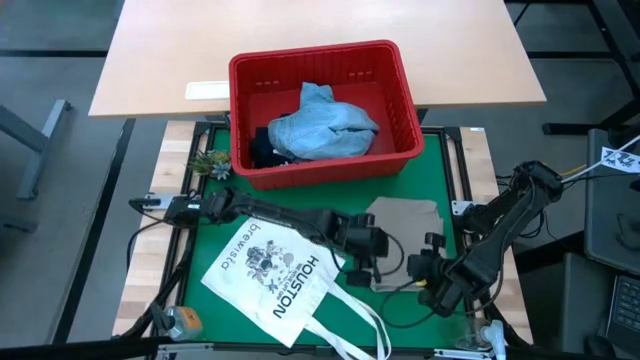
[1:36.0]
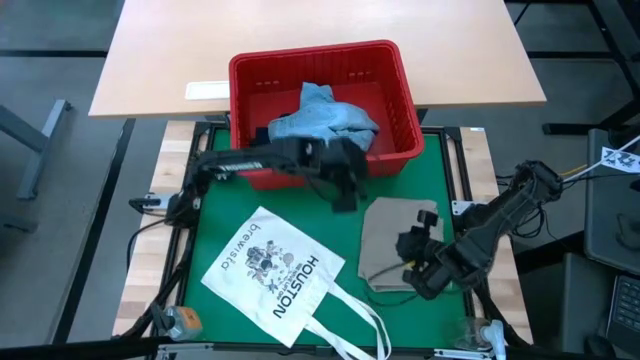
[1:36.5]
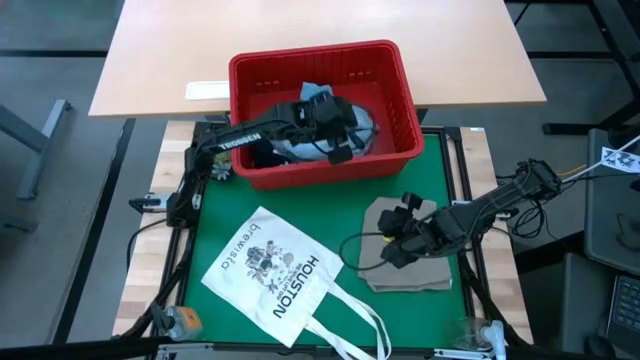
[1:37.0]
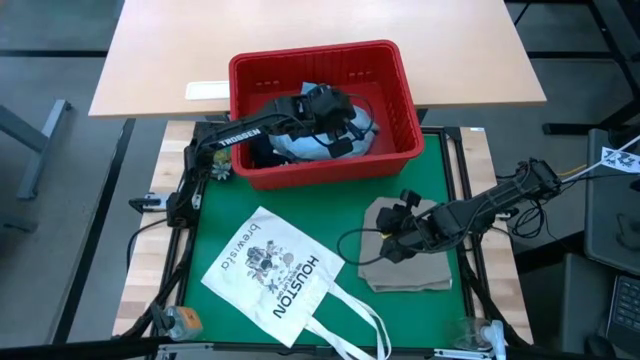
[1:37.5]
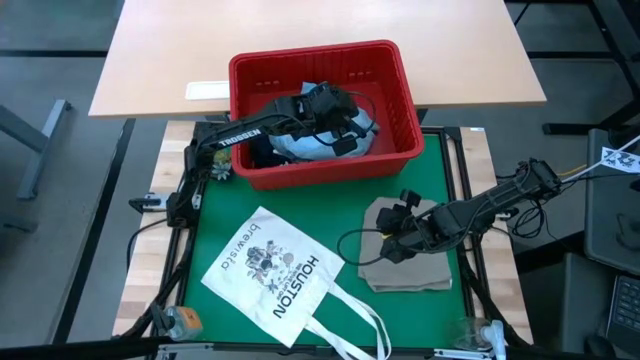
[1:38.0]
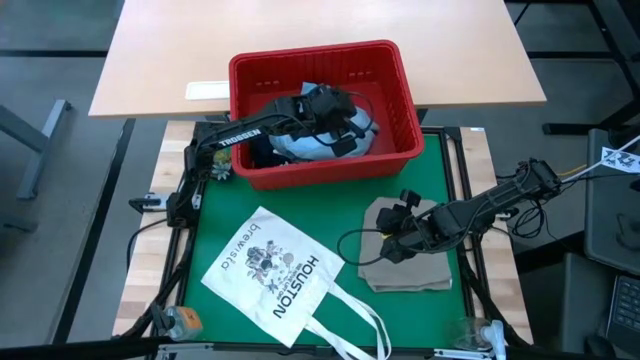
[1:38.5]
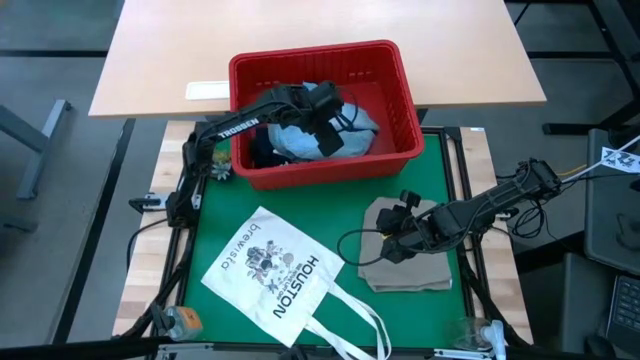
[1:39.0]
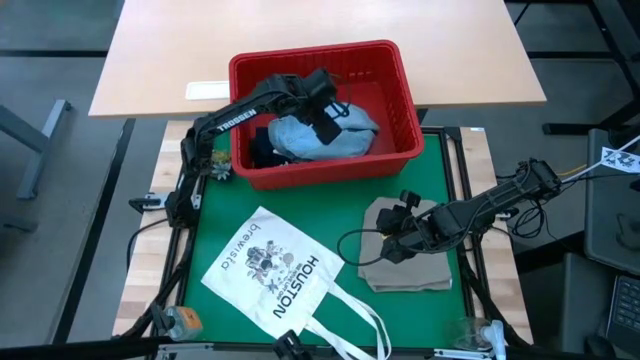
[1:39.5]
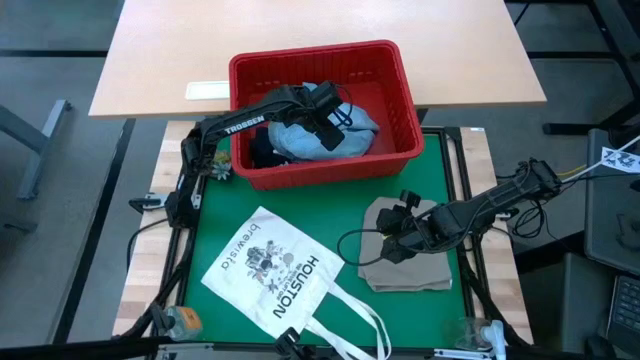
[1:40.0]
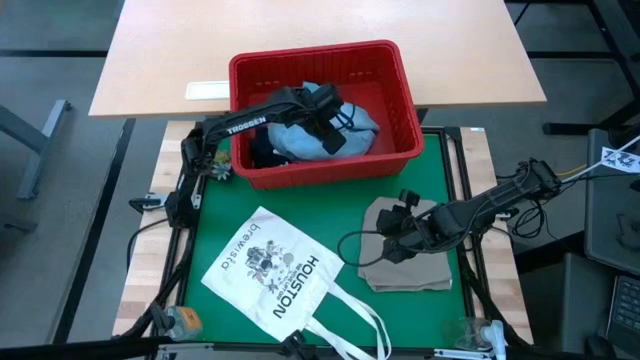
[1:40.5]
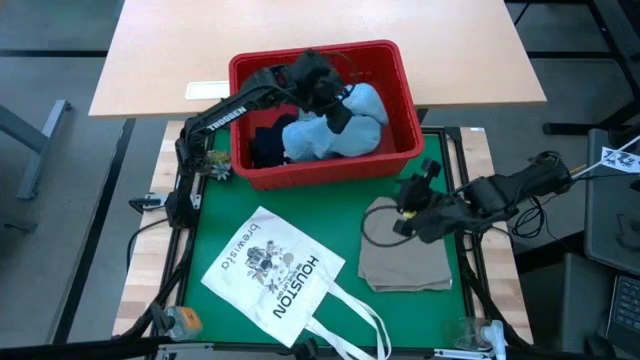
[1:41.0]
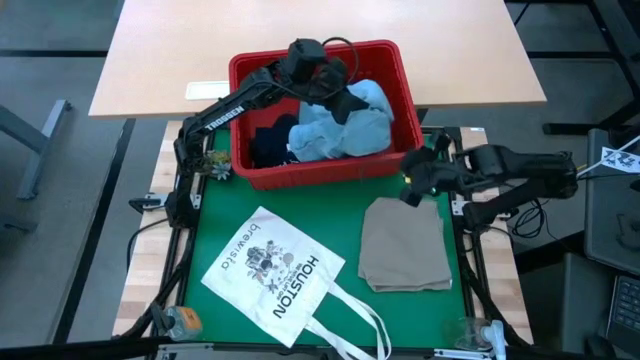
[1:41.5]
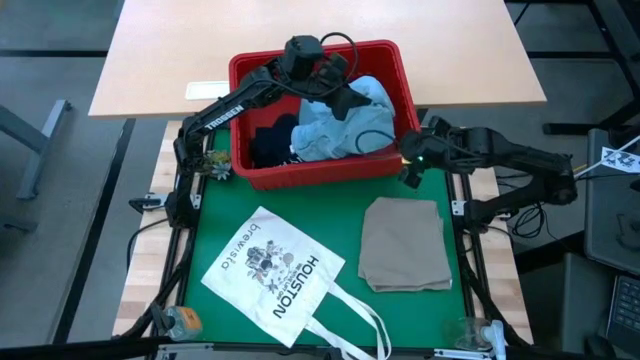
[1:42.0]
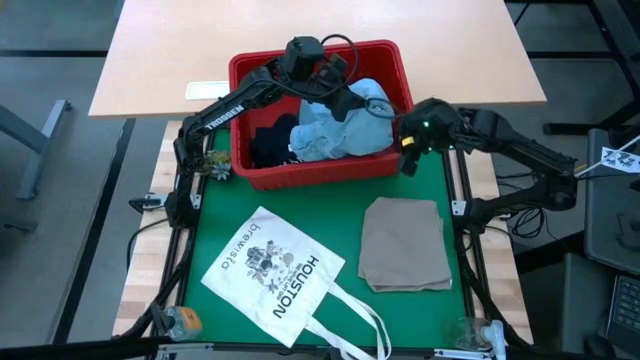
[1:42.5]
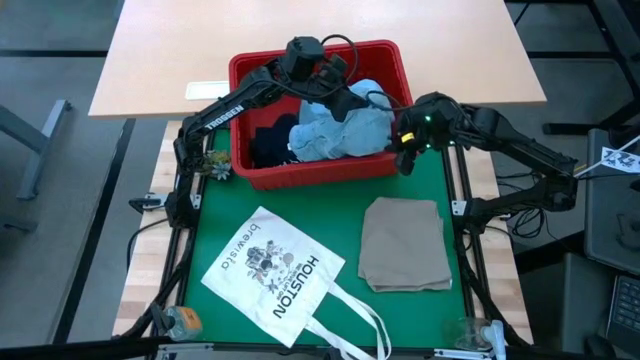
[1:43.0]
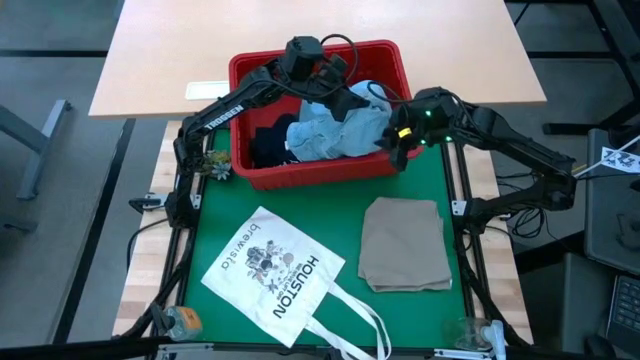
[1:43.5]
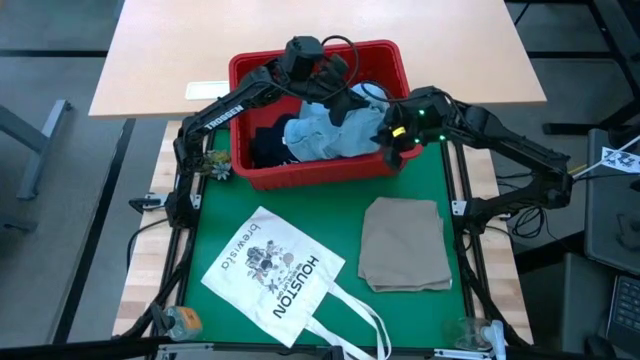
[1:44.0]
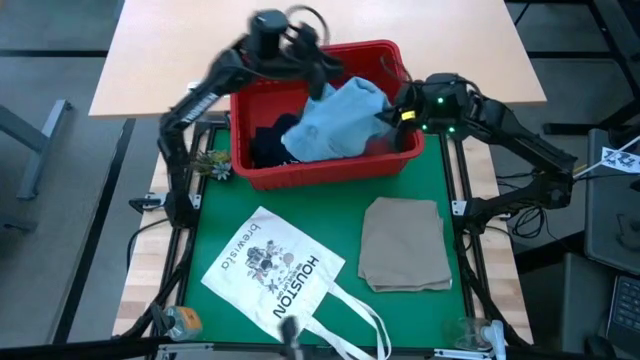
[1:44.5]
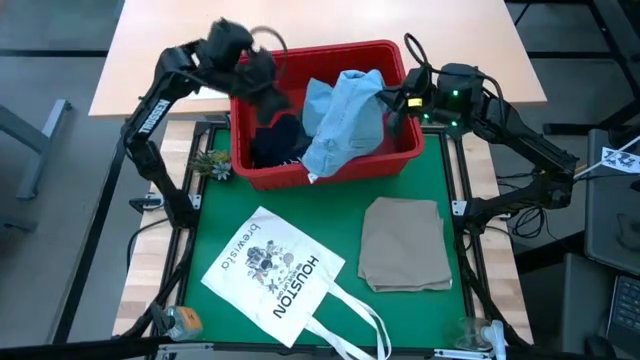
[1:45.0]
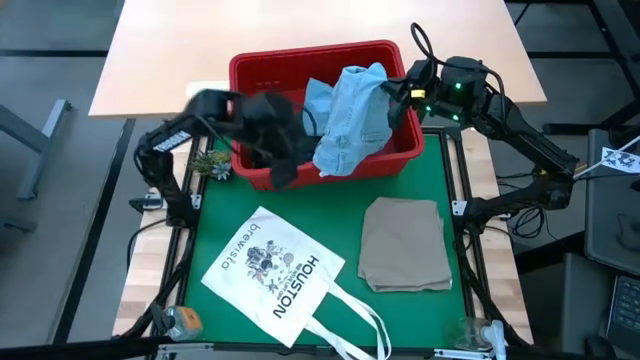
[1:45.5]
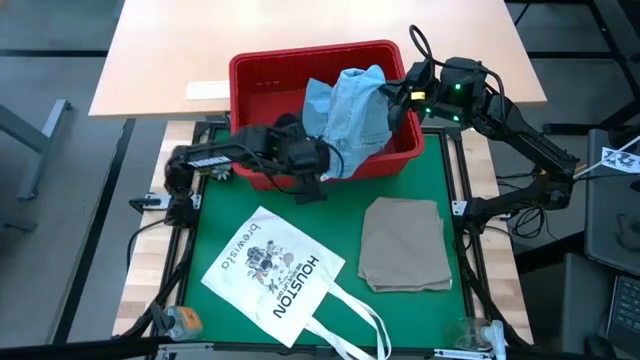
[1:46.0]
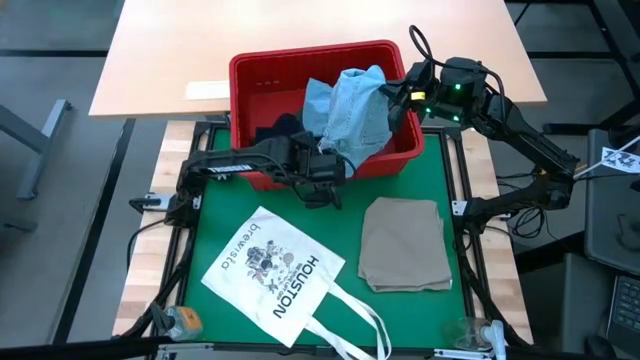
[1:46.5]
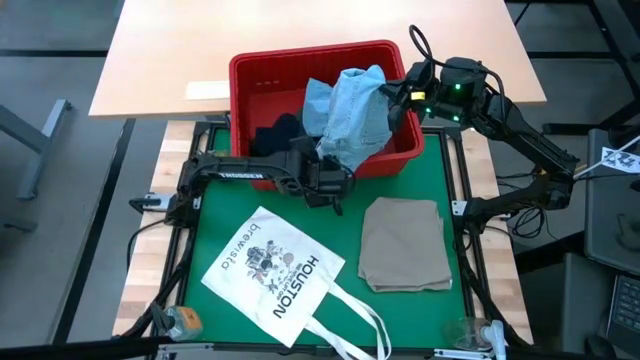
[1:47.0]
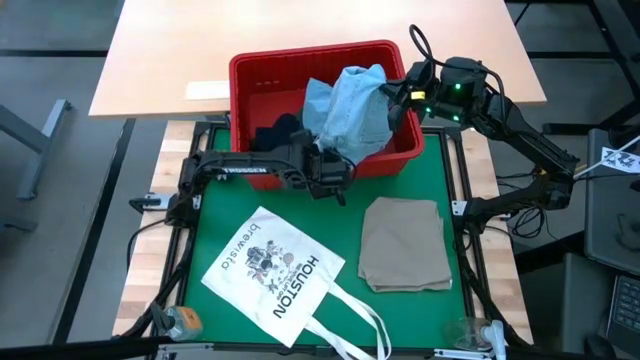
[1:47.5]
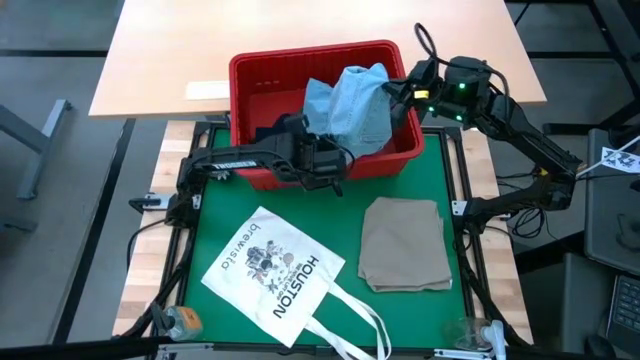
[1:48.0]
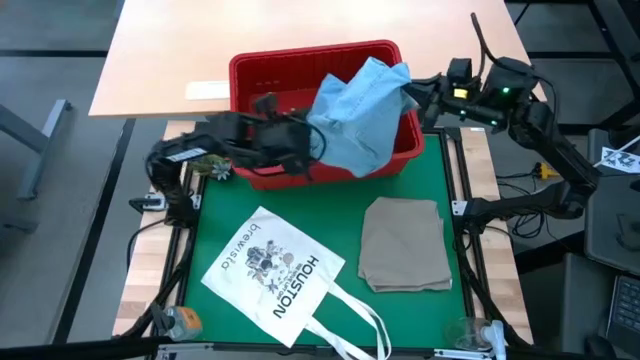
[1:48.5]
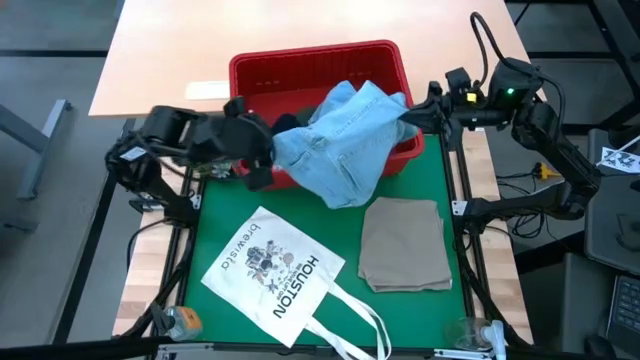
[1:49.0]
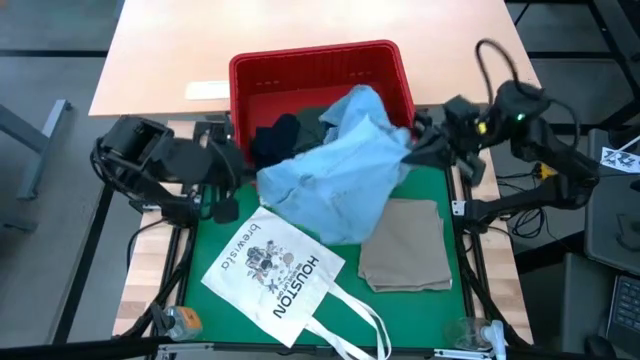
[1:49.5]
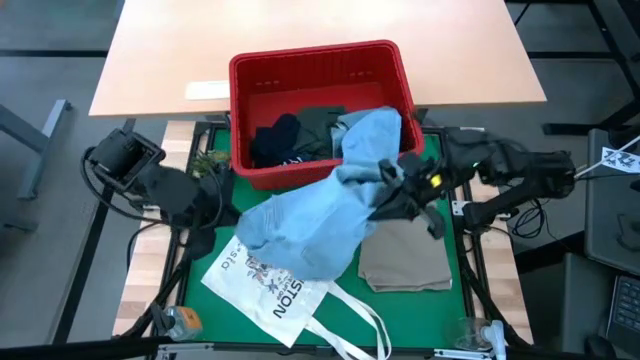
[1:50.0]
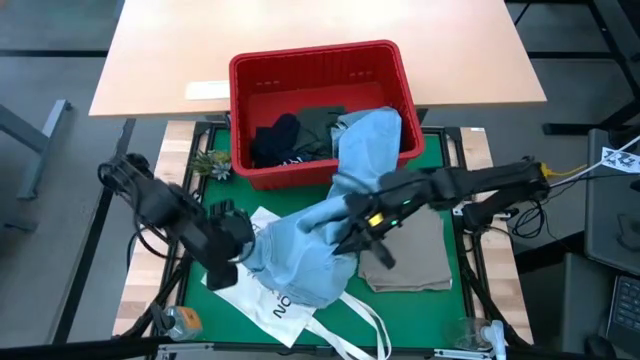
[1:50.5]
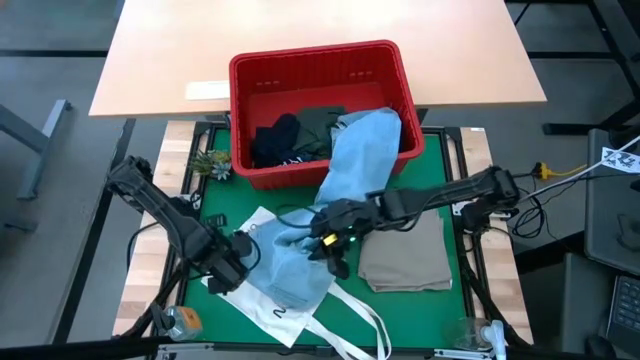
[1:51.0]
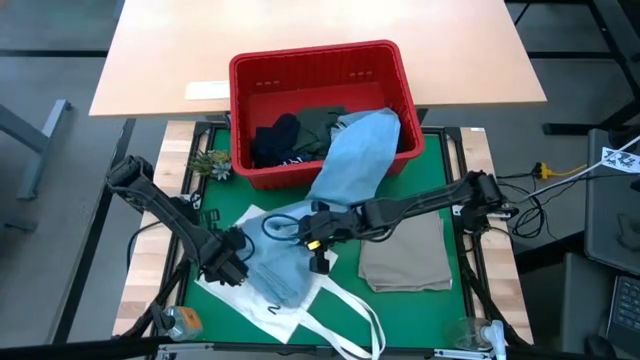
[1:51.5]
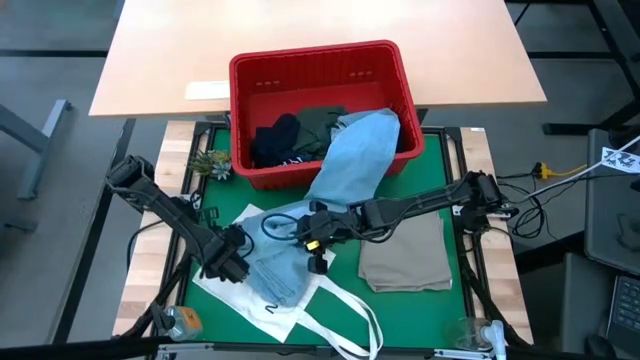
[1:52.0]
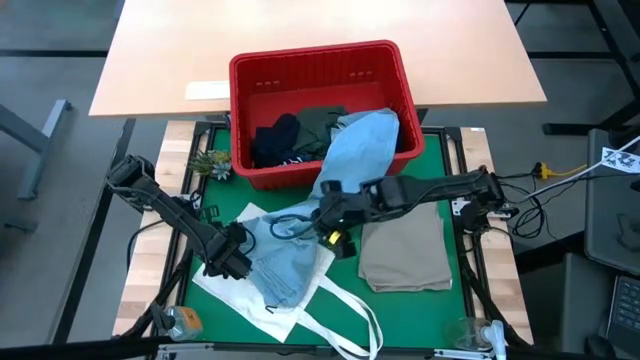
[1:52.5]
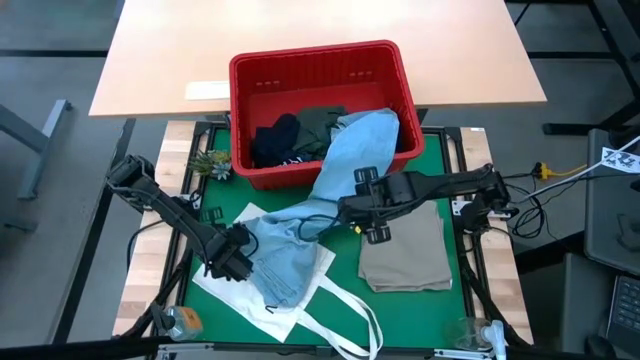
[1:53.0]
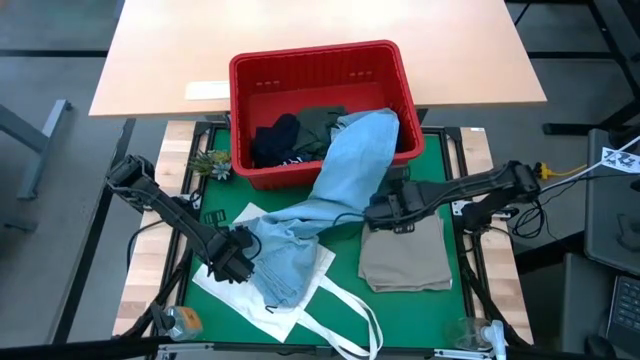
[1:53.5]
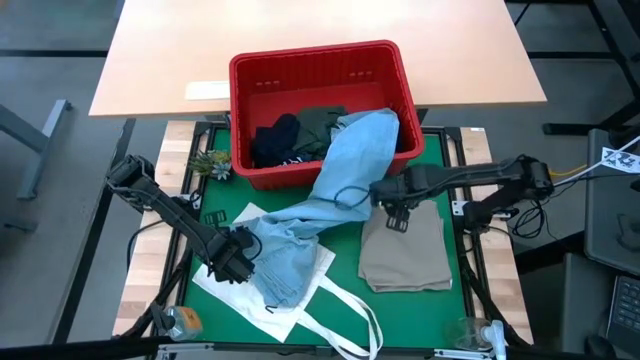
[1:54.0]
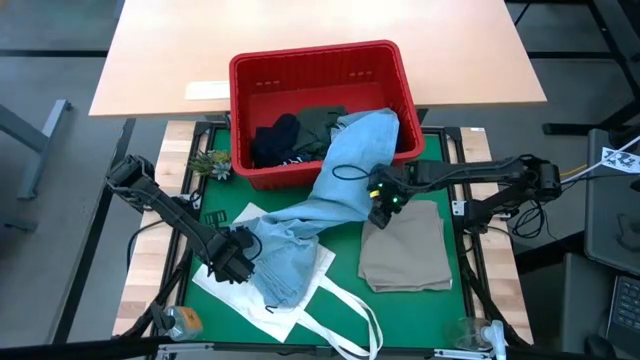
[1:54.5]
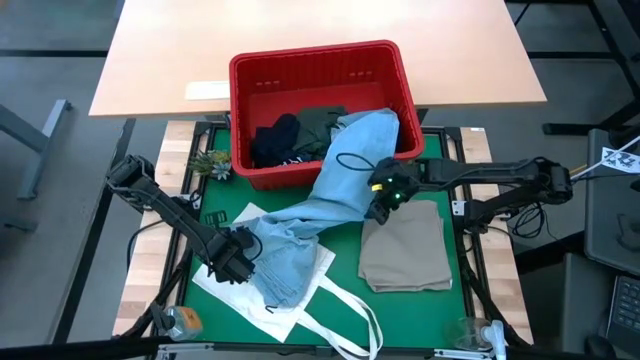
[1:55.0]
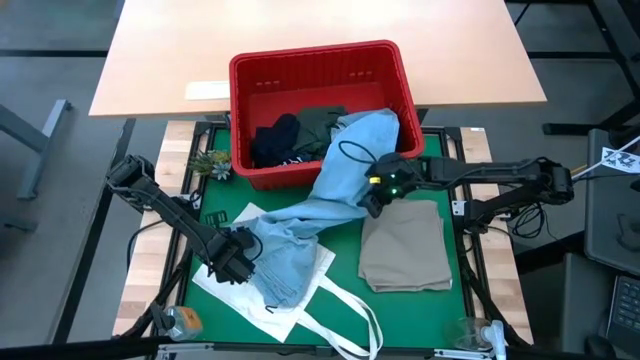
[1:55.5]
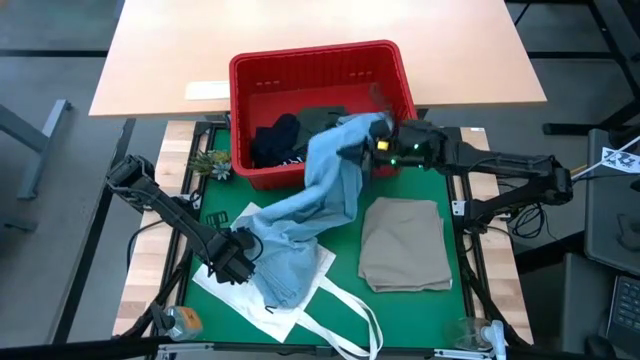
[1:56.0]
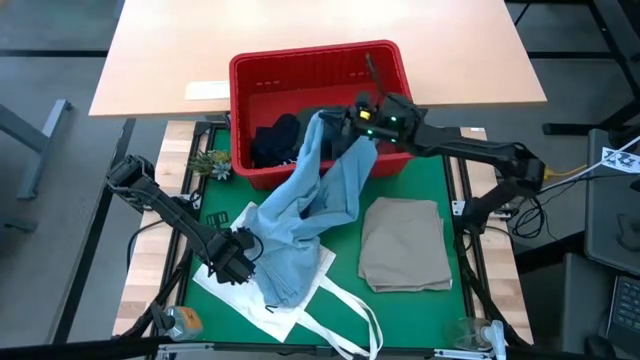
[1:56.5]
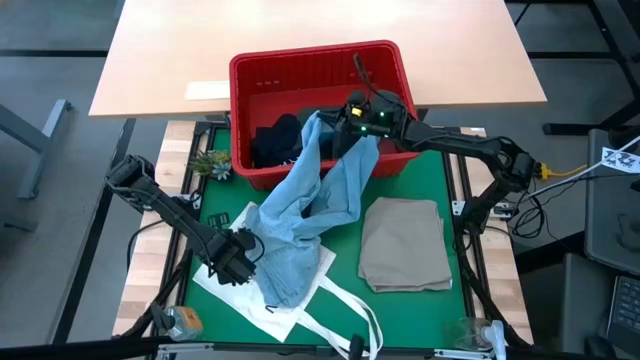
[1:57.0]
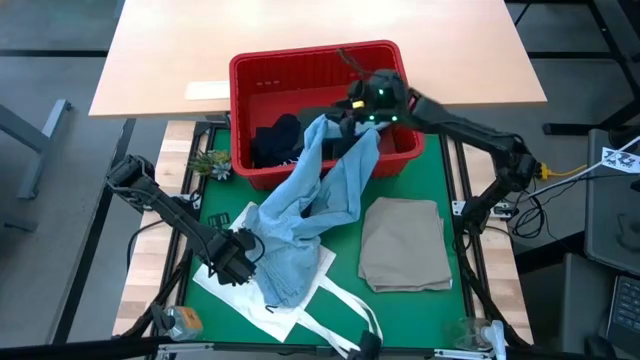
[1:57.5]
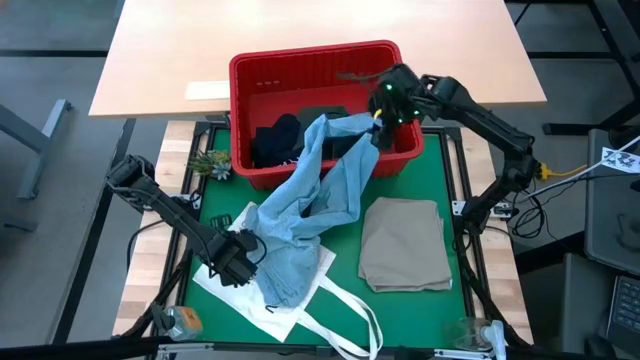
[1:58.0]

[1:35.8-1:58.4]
Task: Fold Laundry from Bin
Fold the light blue pants
